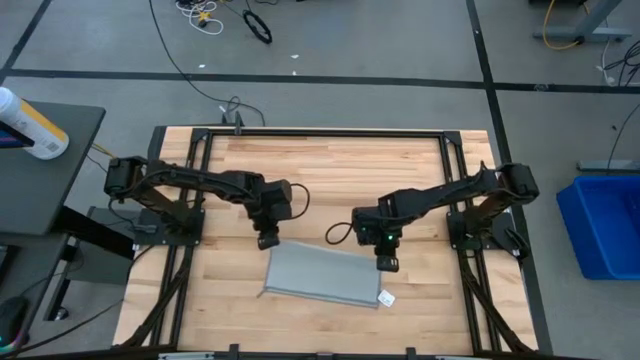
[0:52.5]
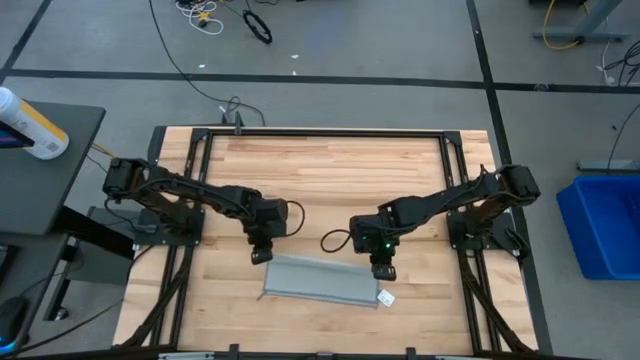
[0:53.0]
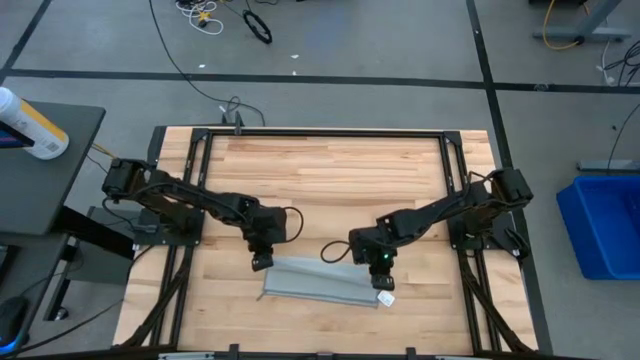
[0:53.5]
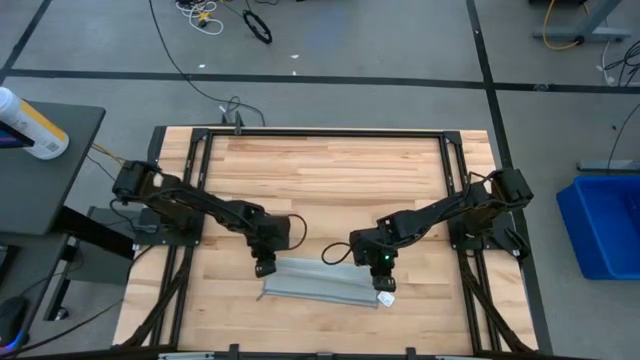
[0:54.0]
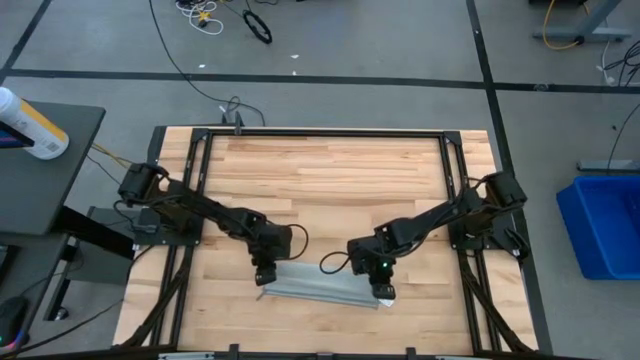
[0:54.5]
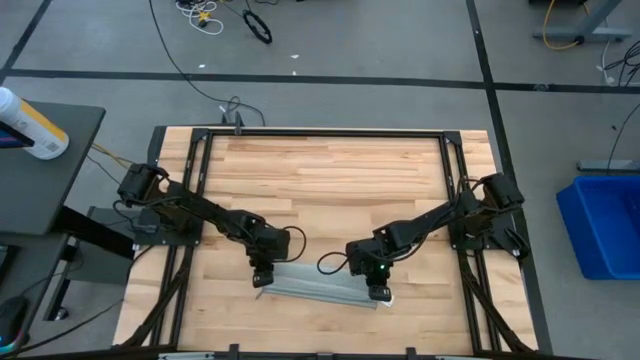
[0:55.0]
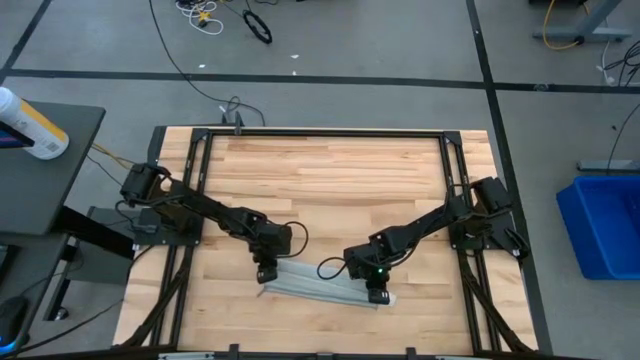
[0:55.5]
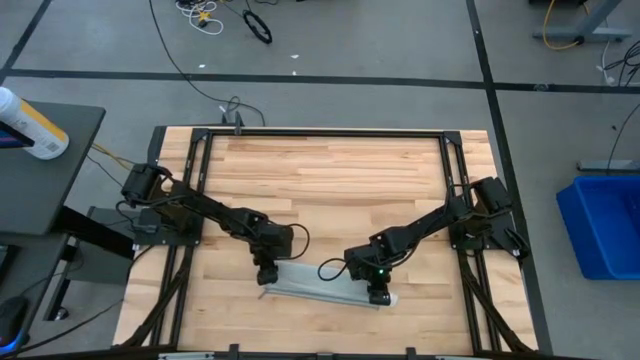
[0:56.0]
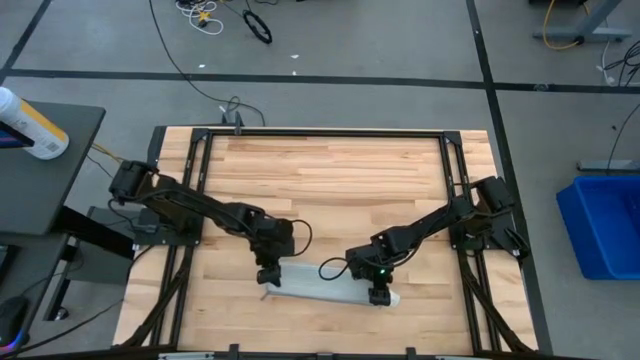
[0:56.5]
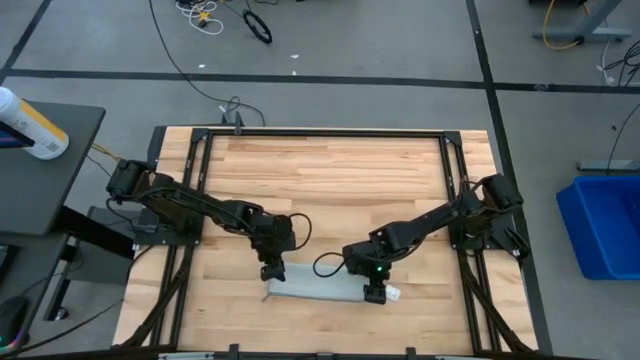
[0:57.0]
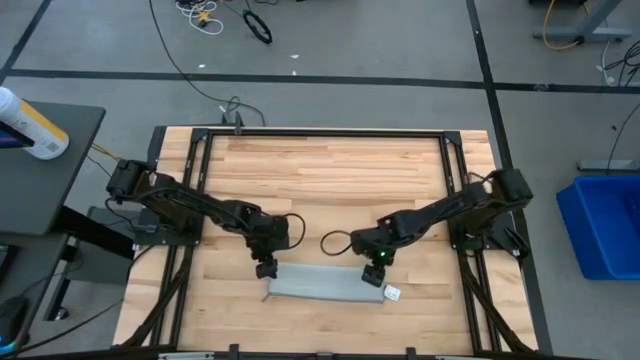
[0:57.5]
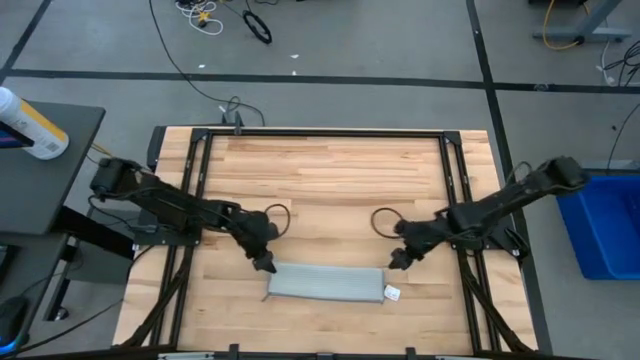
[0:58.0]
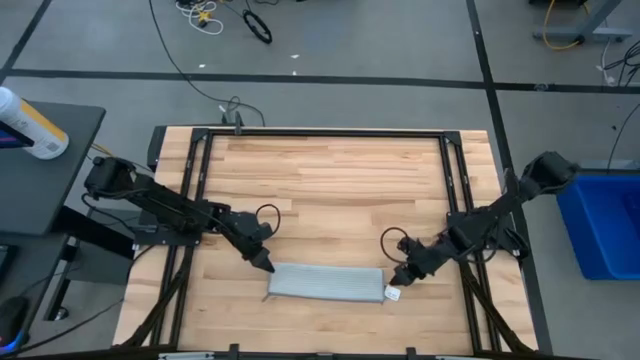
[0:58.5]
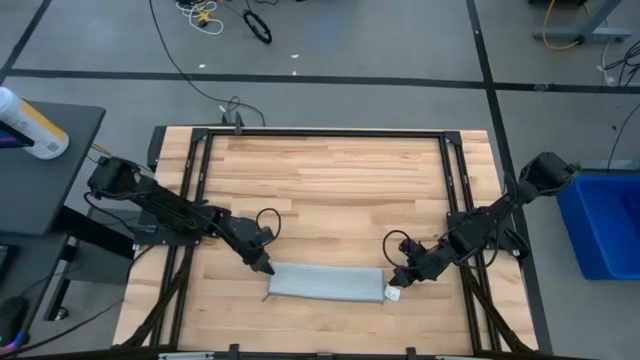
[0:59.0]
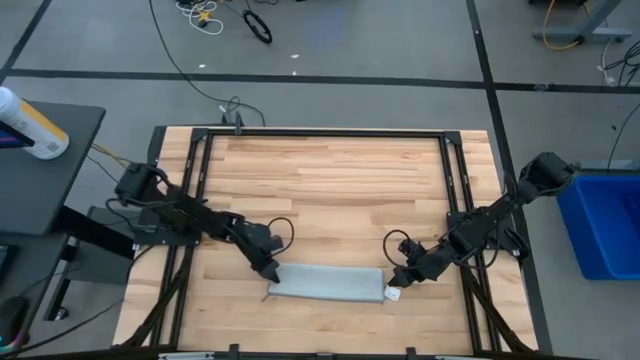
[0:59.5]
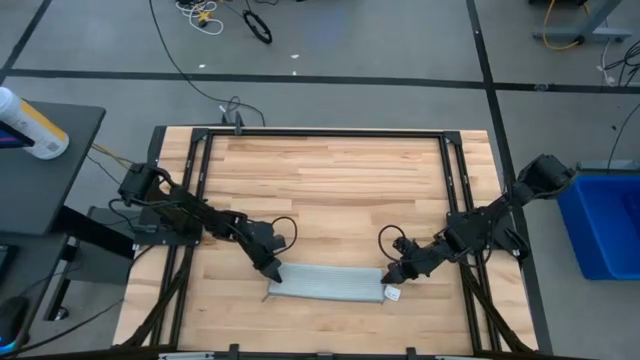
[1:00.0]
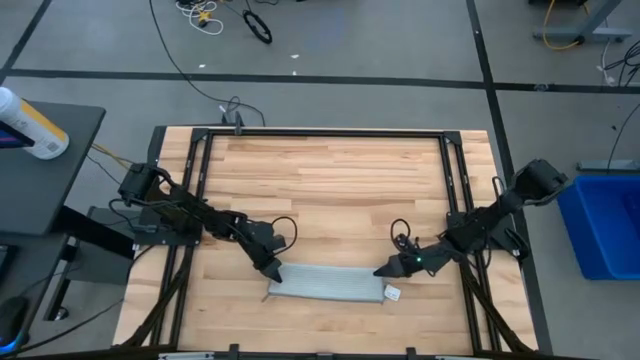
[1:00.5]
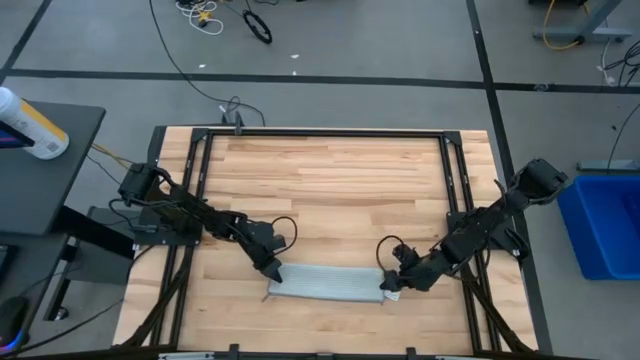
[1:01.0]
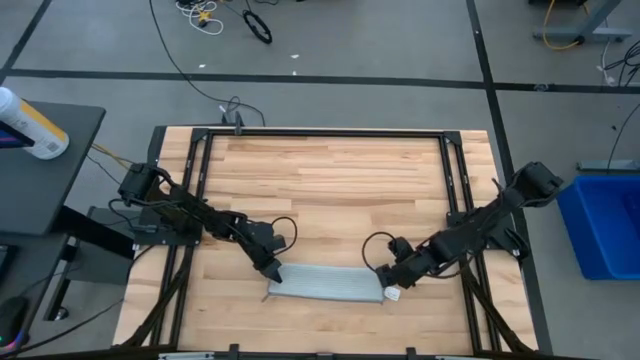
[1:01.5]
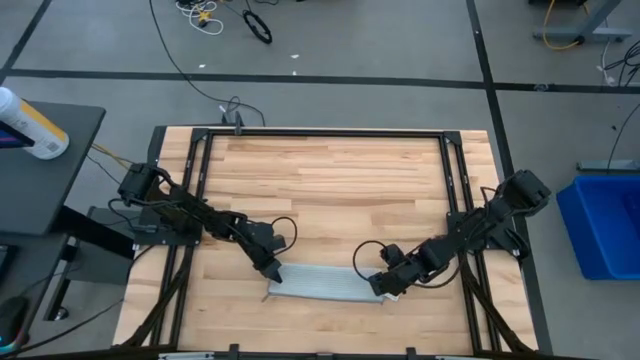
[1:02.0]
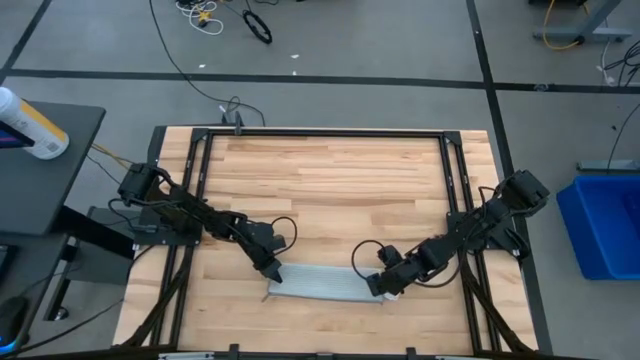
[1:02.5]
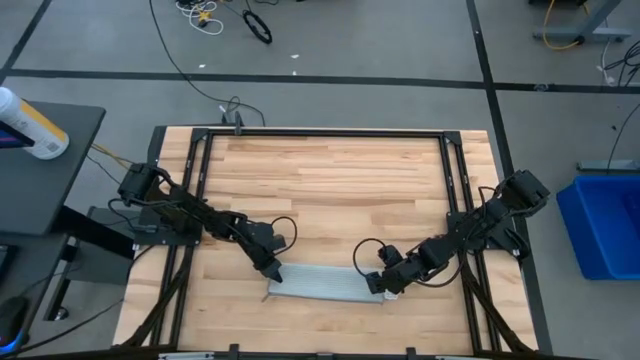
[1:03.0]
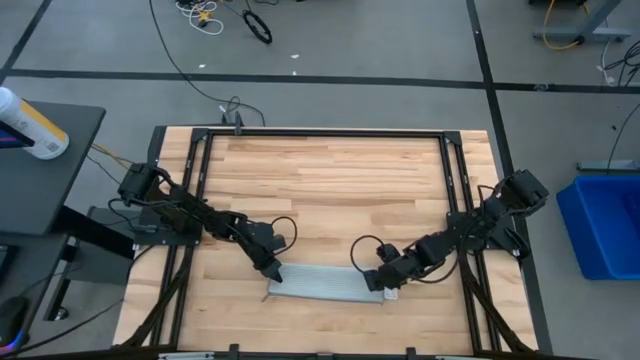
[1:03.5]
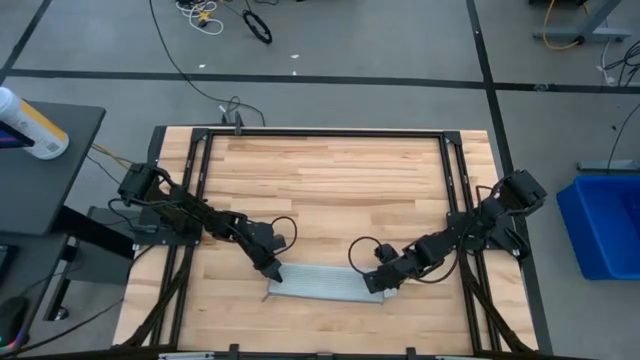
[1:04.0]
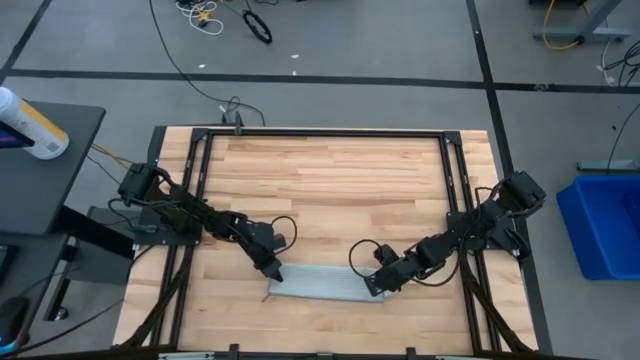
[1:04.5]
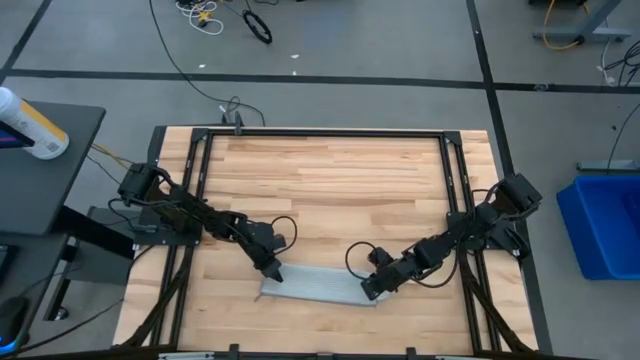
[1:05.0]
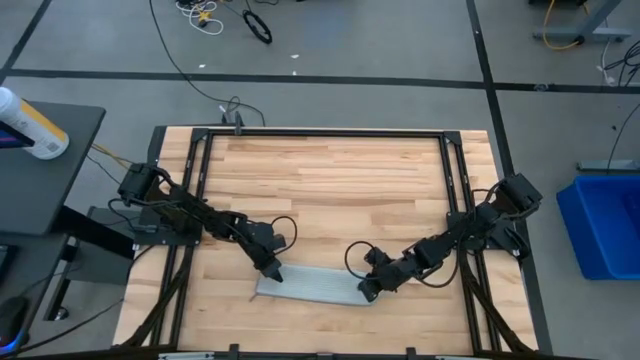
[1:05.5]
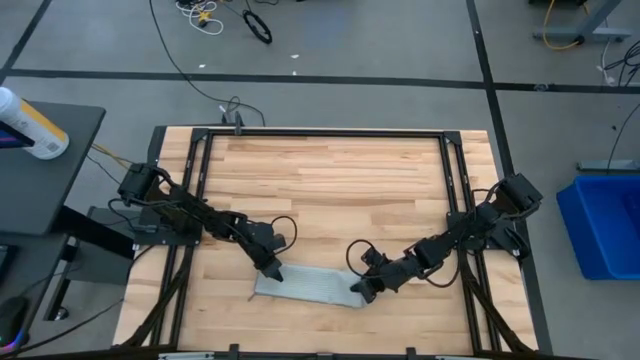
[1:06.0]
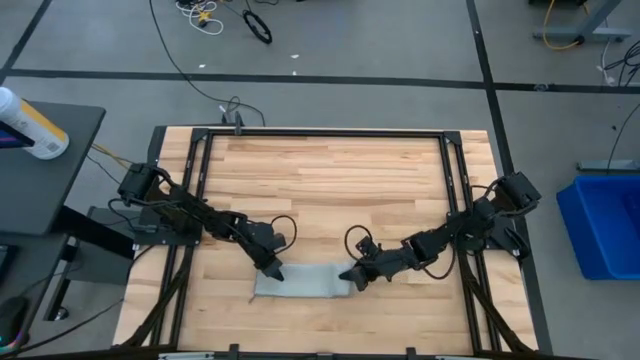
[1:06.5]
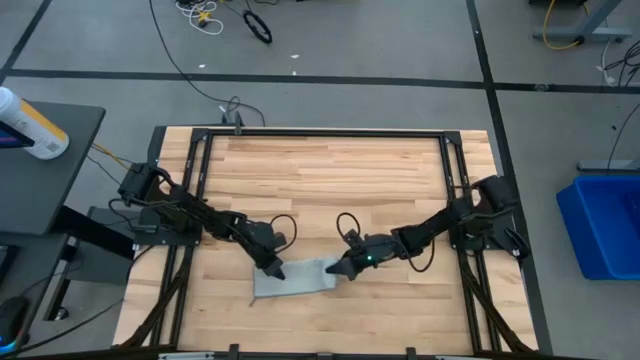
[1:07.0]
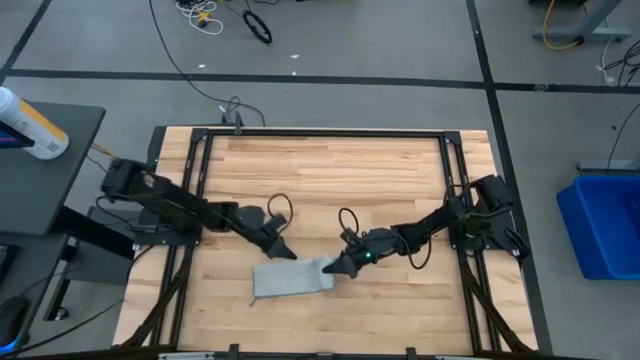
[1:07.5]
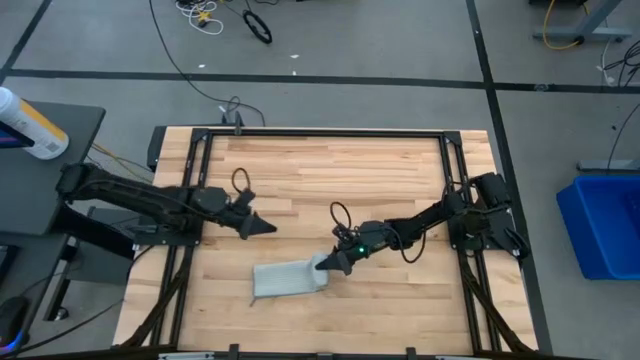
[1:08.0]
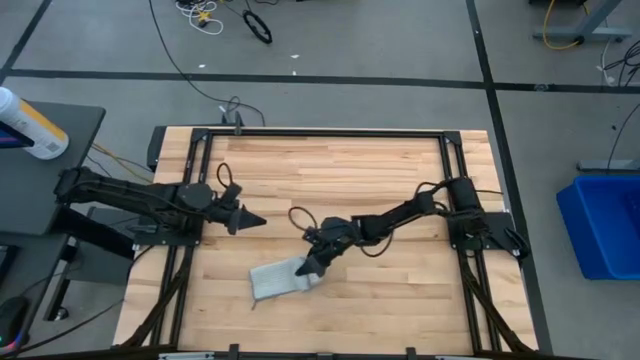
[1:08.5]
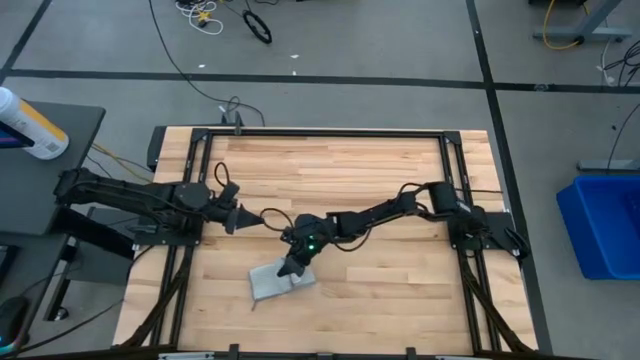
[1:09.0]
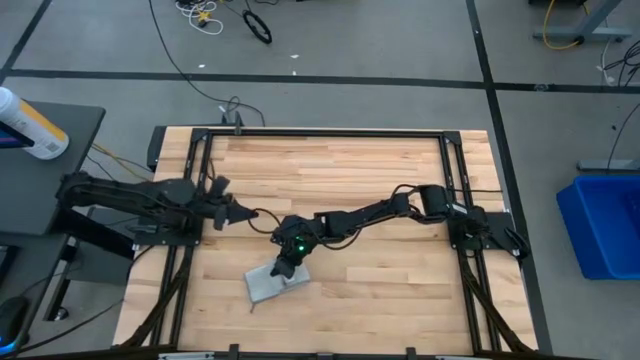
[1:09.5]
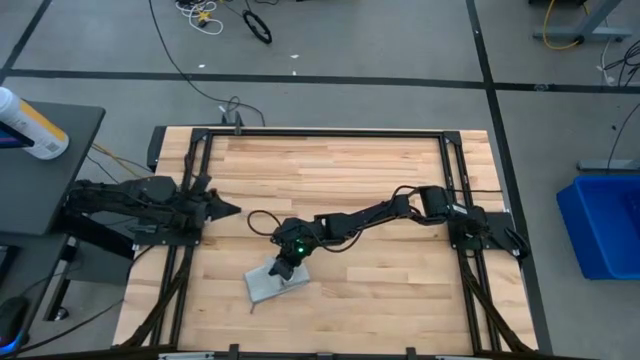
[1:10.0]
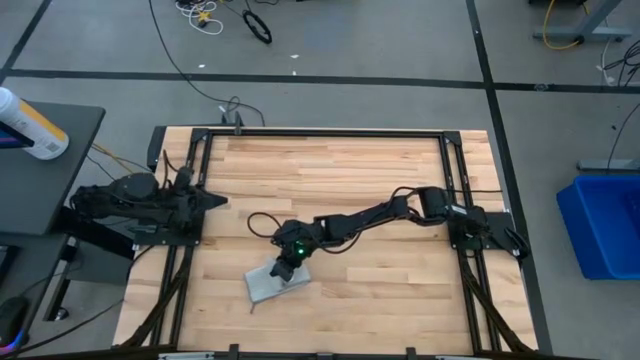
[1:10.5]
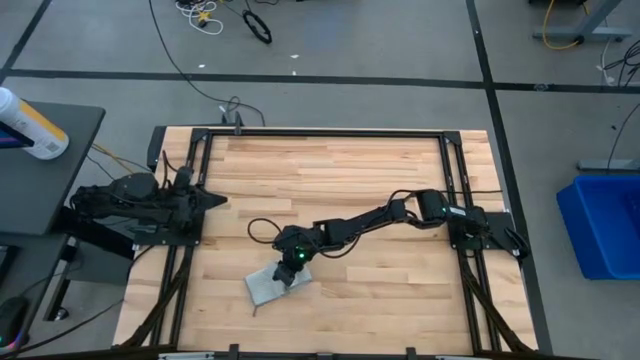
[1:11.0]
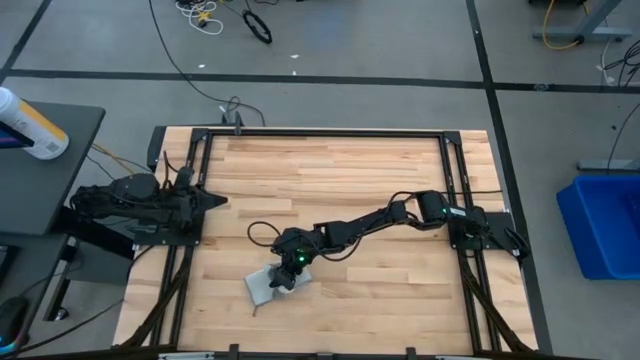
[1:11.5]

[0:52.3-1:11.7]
Task: Fold microfiber towels
Fold the gray microfiber towel
